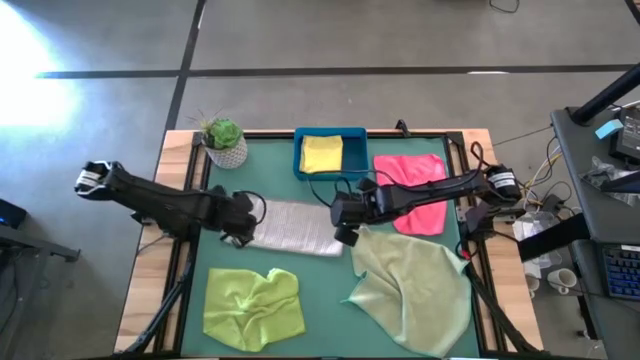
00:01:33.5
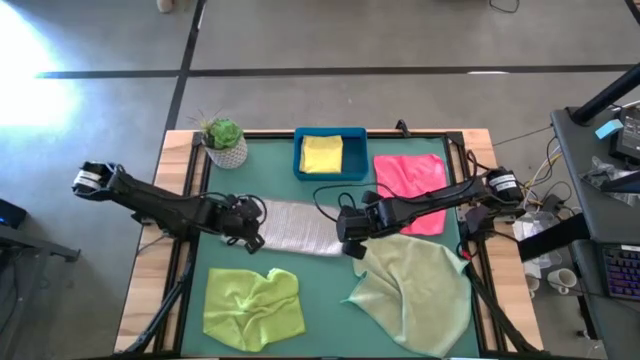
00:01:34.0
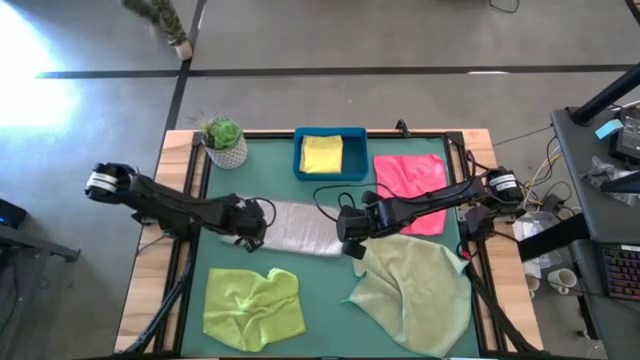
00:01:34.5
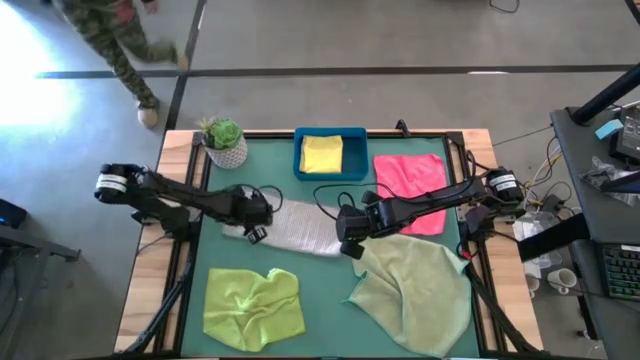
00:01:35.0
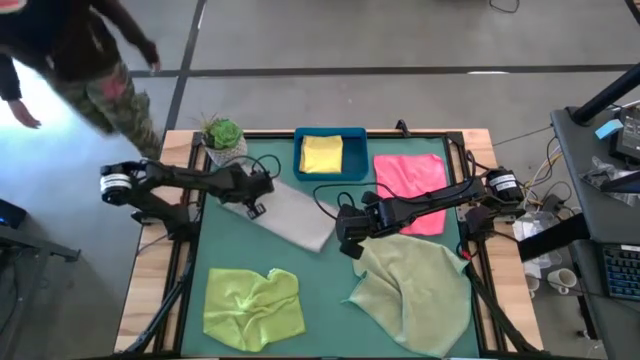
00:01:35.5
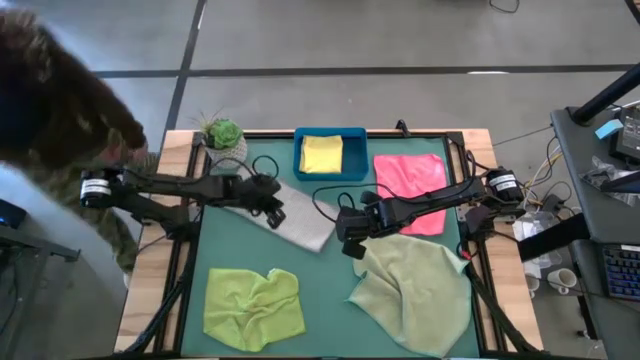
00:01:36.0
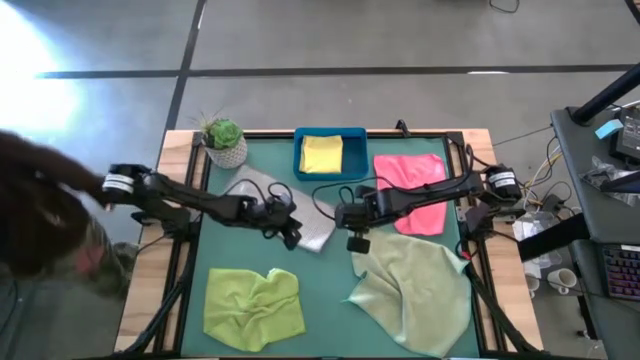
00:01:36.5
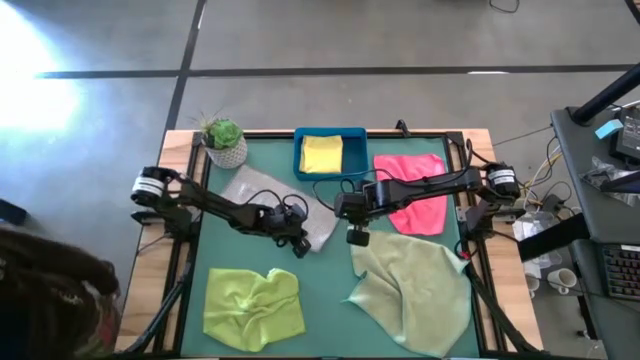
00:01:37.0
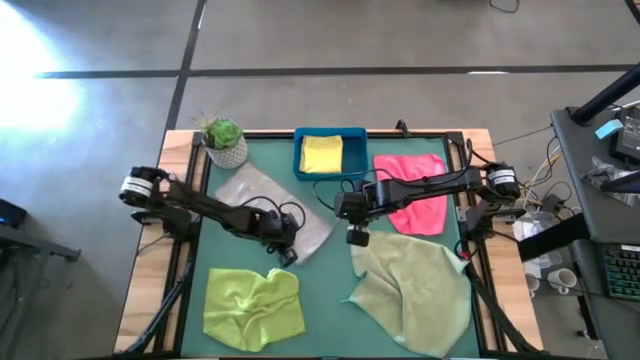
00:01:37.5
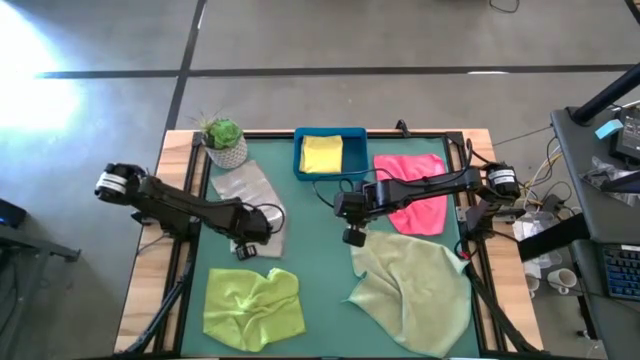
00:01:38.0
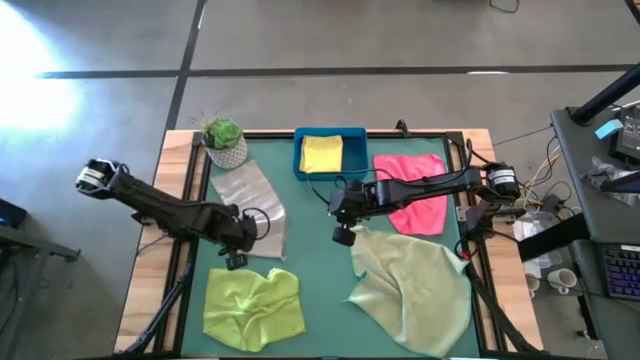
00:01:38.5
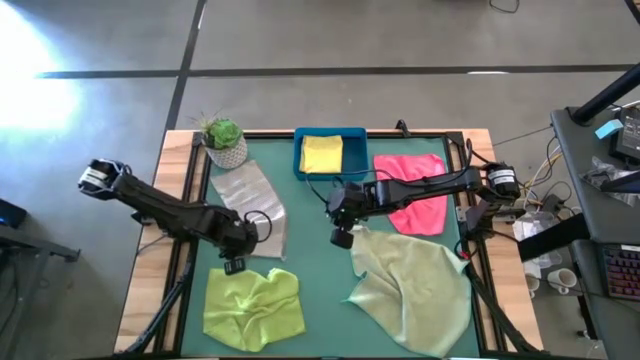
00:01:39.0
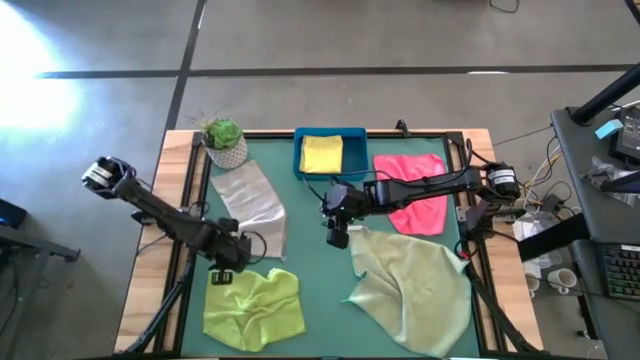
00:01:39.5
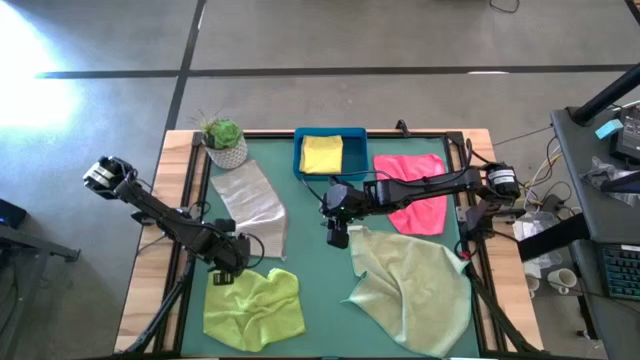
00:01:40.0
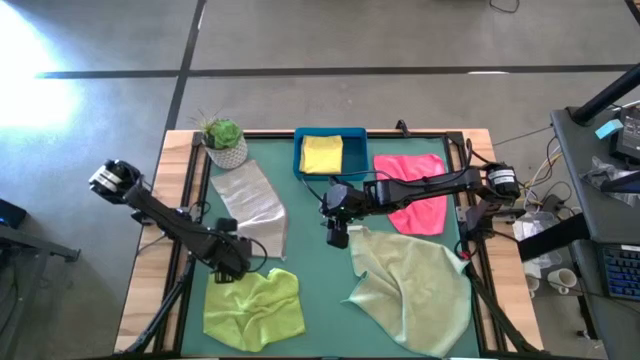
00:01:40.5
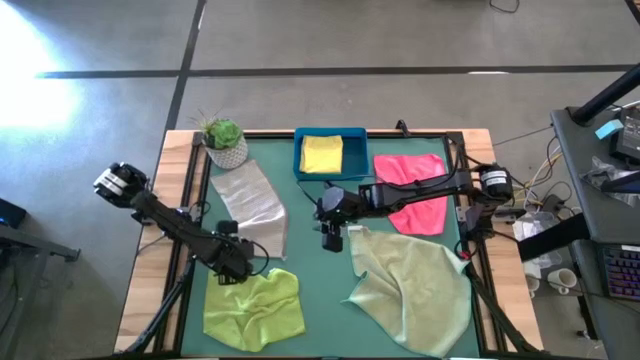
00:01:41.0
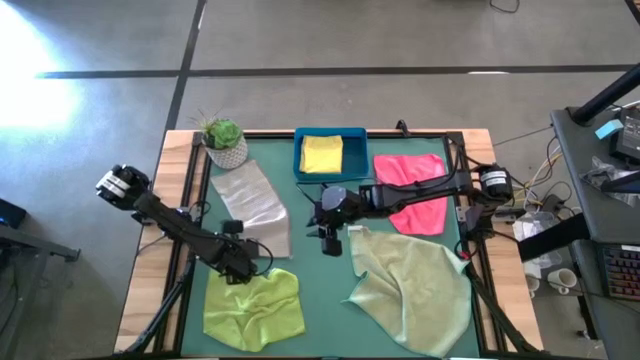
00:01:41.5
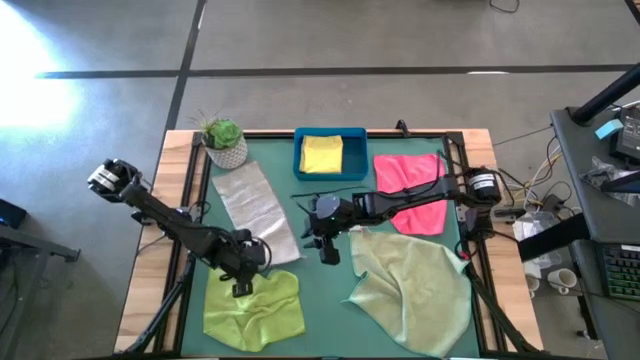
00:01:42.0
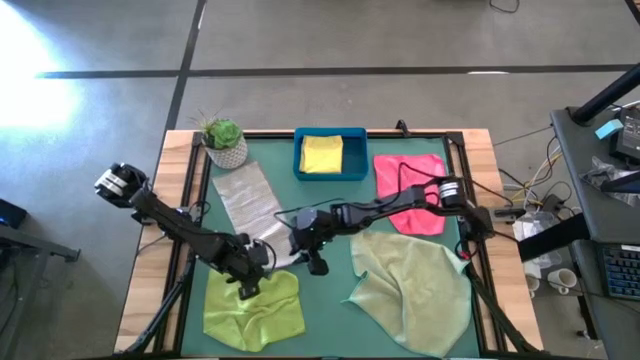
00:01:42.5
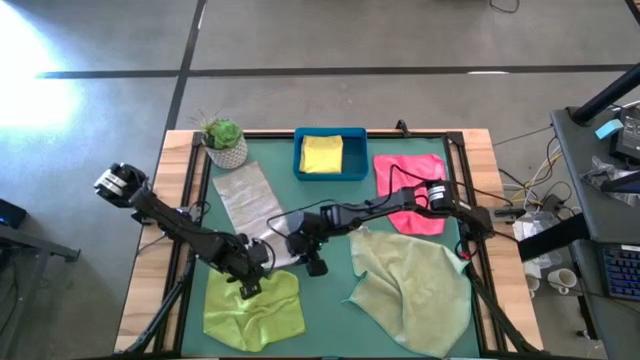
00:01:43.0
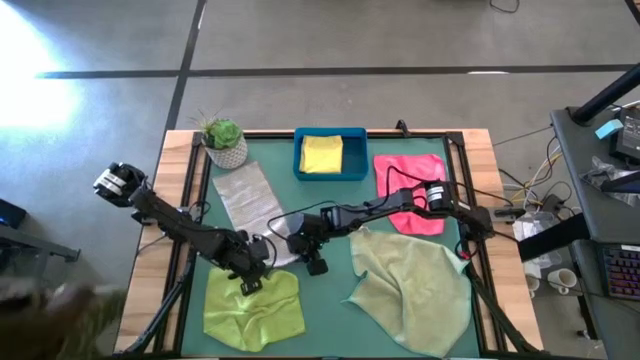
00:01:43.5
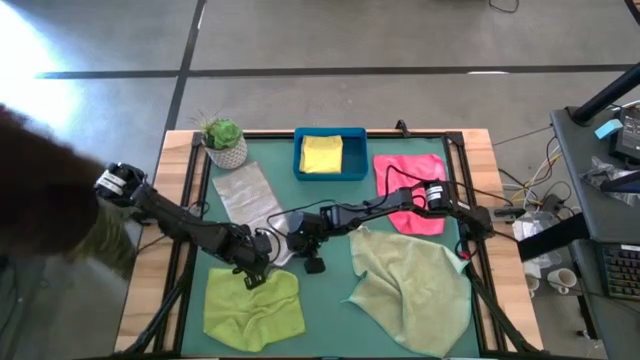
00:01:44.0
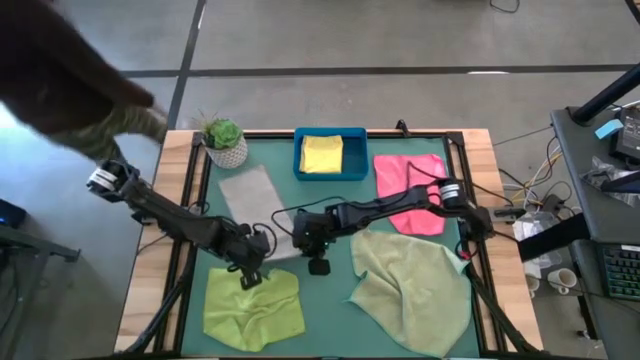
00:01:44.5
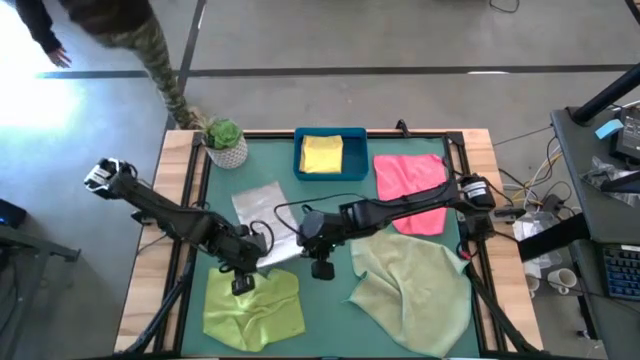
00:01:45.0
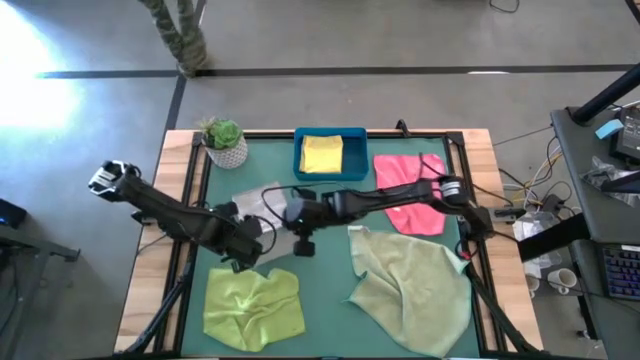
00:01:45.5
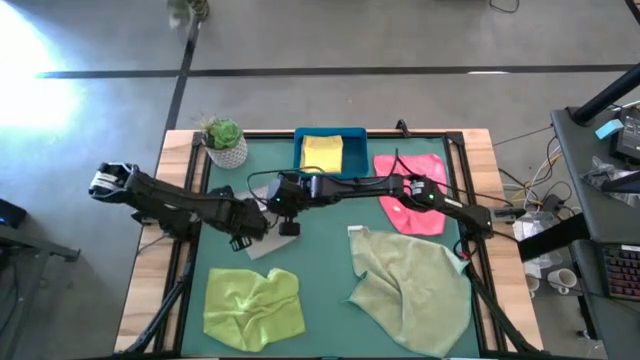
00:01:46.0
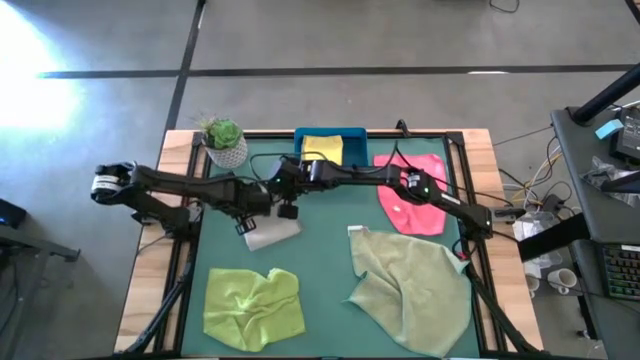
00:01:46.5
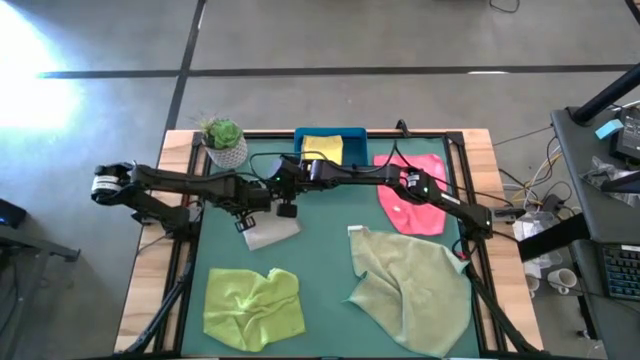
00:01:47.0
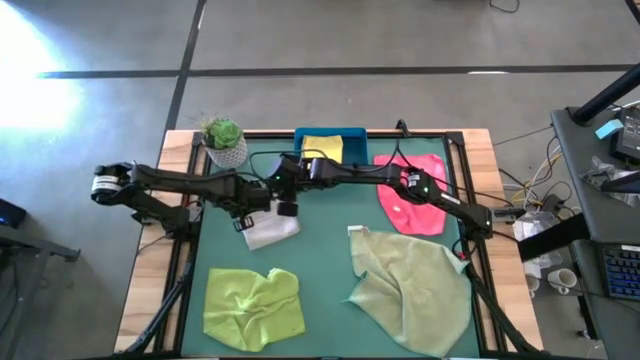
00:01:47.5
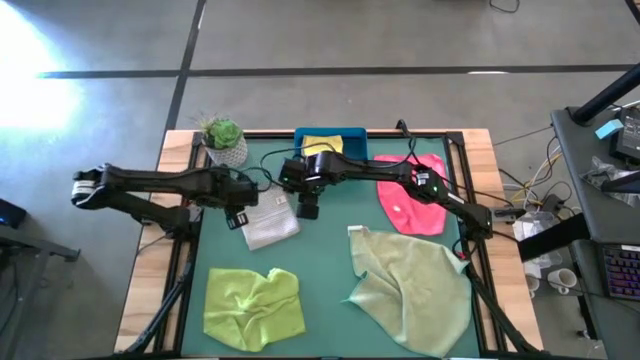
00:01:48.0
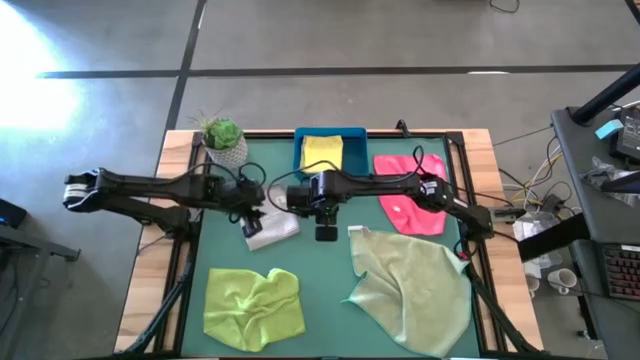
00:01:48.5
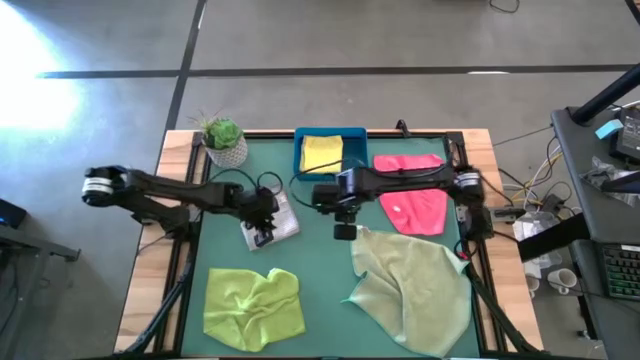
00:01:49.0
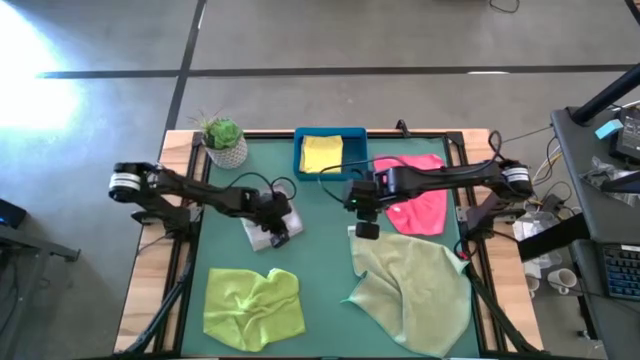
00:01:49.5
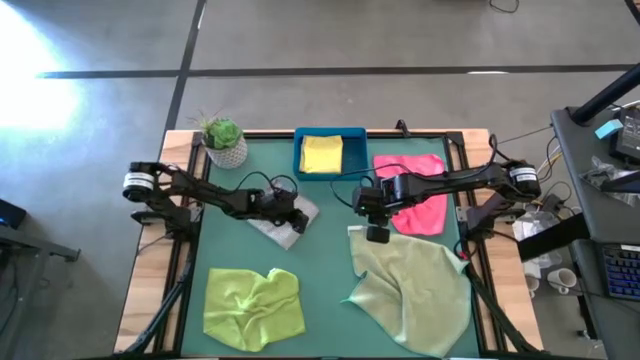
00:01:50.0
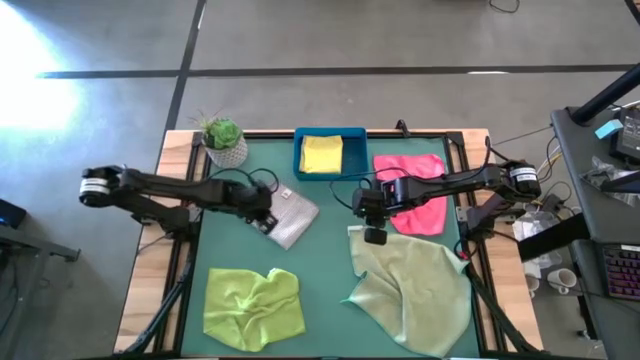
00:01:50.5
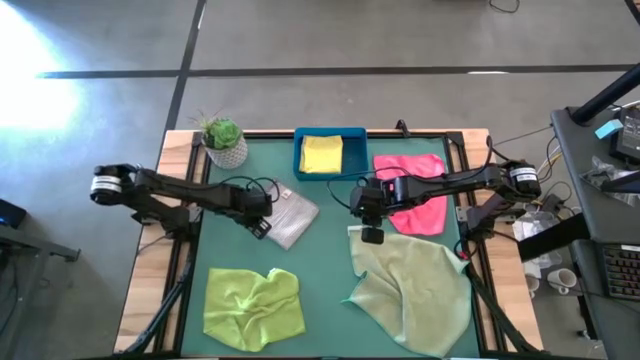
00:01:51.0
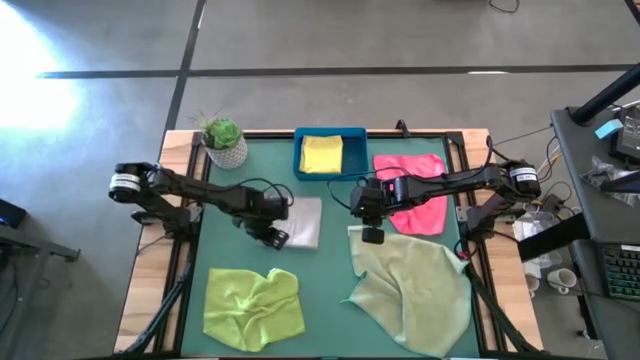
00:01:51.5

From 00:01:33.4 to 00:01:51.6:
Task: Fold microfiber towels
Fold the gray microfiber cloth

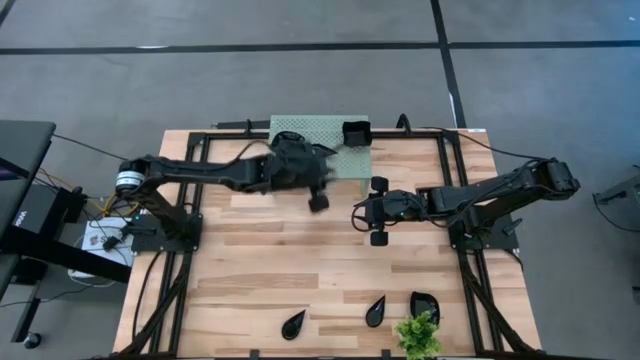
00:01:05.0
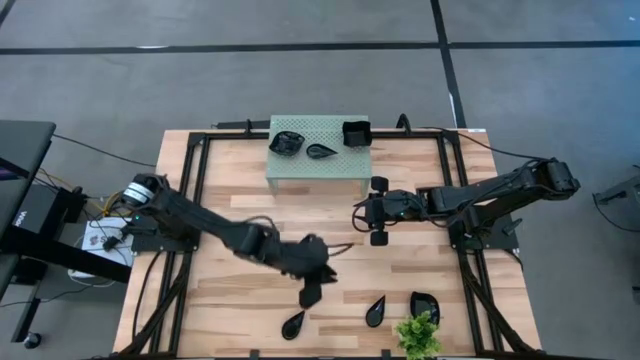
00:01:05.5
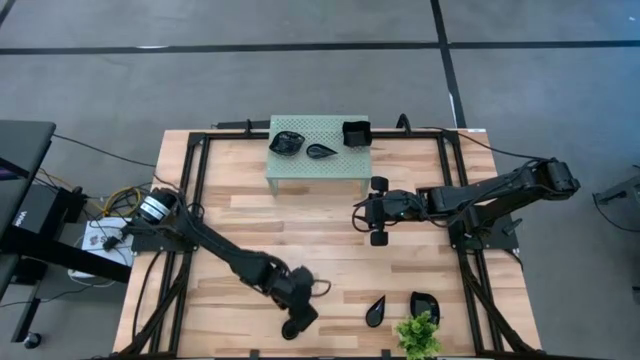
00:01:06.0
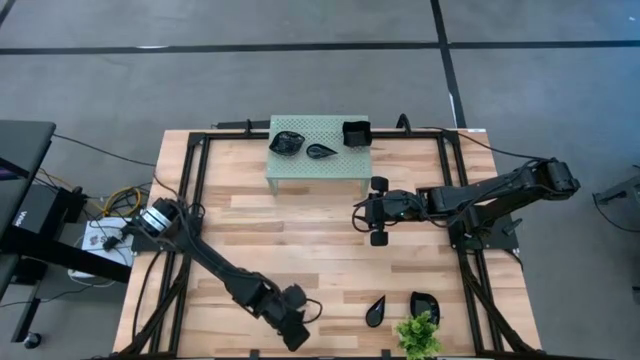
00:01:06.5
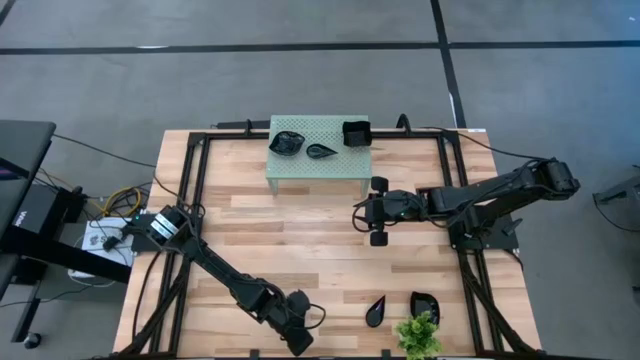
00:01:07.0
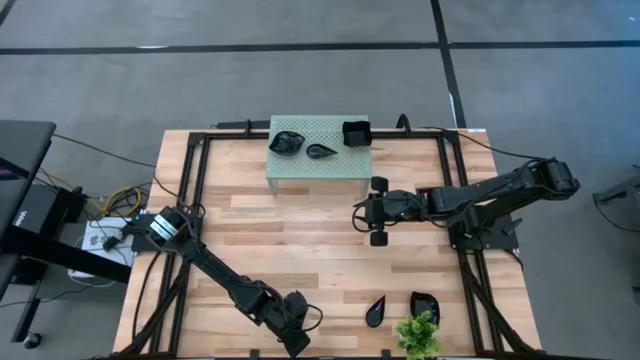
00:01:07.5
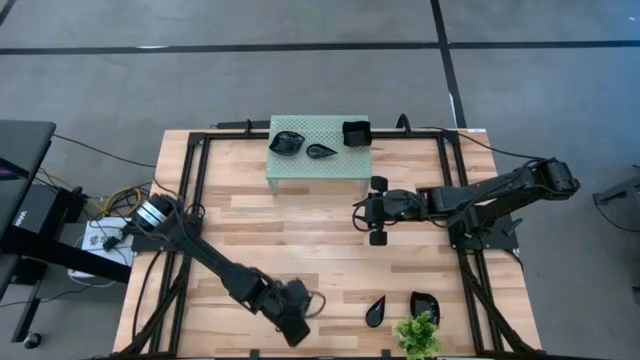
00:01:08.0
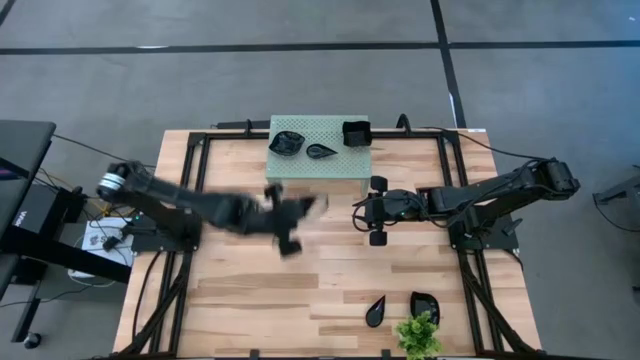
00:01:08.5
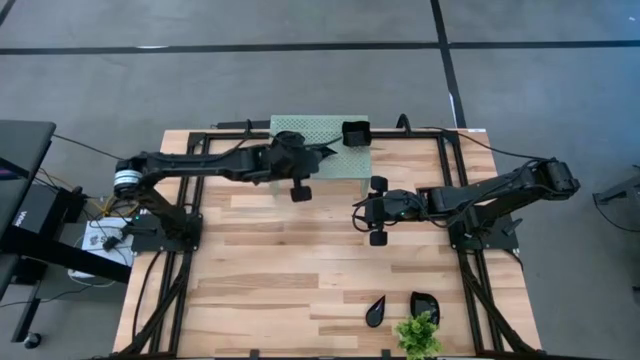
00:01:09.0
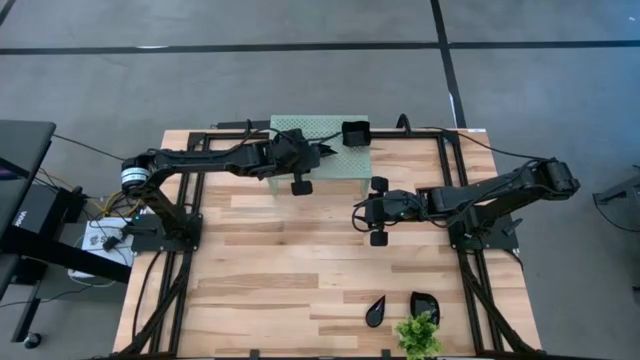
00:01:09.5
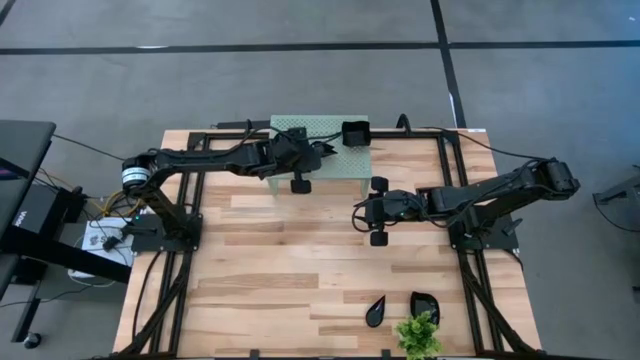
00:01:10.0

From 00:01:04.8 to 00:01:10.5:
Task: Pick & Place Mini shaped plates
Stack the drop-shaped plate on top of the other drop-shaped plates on the shelf
